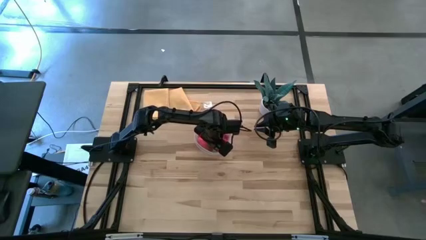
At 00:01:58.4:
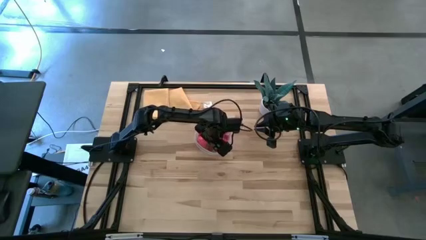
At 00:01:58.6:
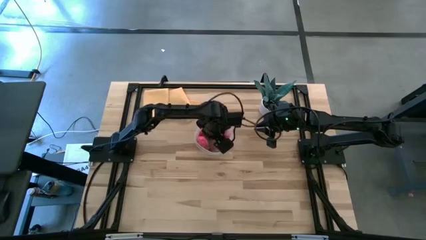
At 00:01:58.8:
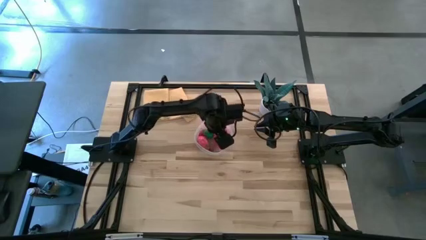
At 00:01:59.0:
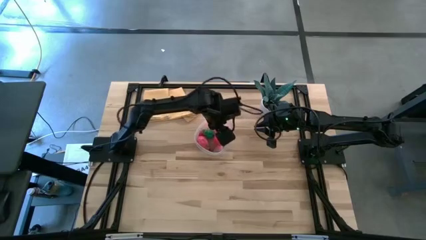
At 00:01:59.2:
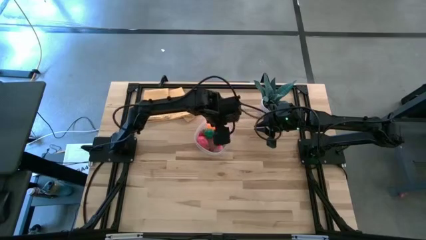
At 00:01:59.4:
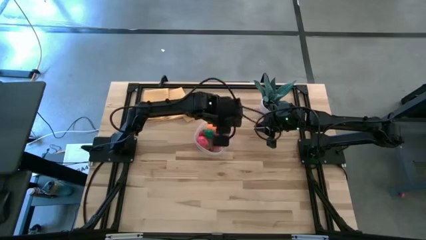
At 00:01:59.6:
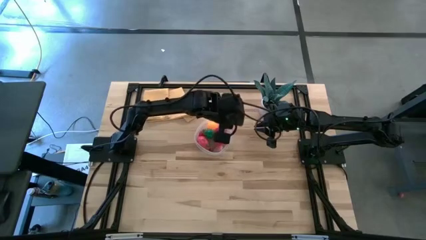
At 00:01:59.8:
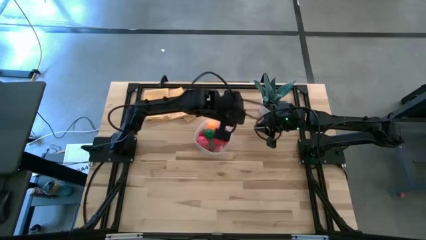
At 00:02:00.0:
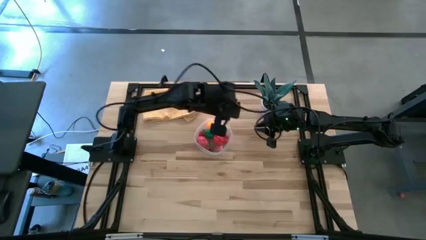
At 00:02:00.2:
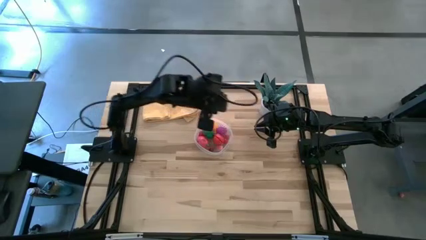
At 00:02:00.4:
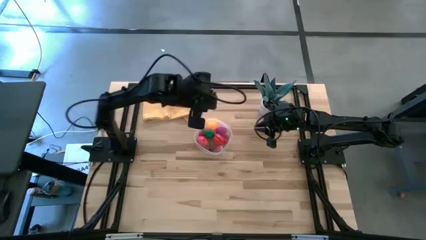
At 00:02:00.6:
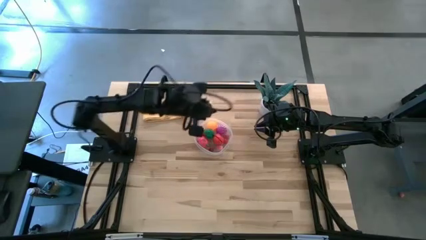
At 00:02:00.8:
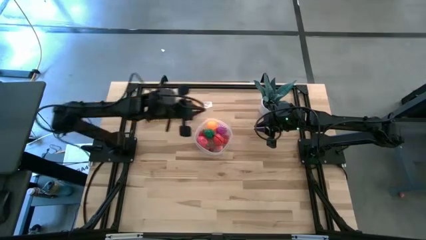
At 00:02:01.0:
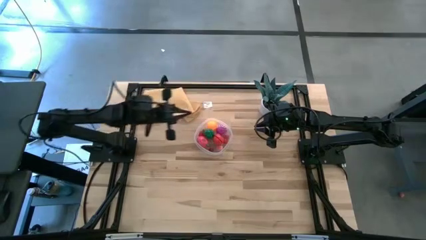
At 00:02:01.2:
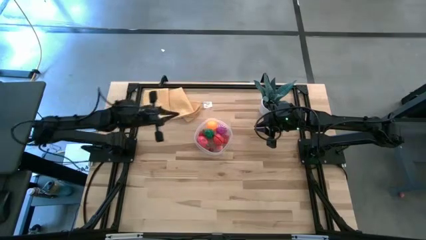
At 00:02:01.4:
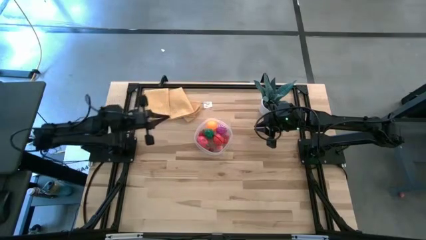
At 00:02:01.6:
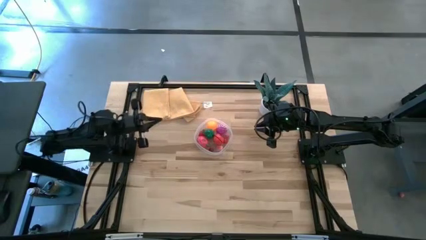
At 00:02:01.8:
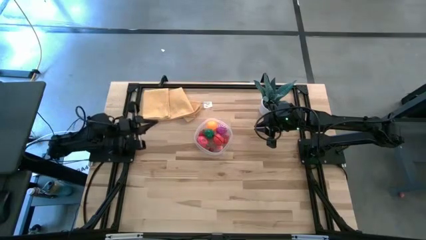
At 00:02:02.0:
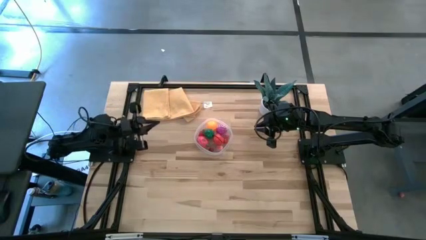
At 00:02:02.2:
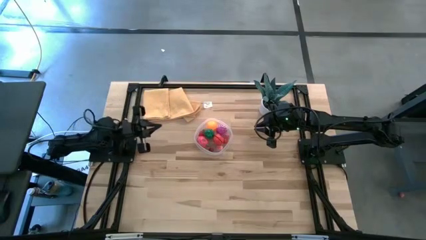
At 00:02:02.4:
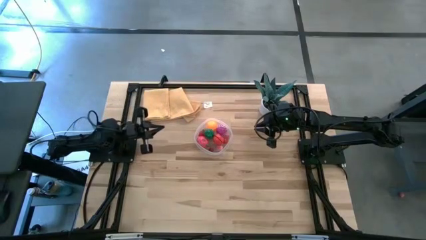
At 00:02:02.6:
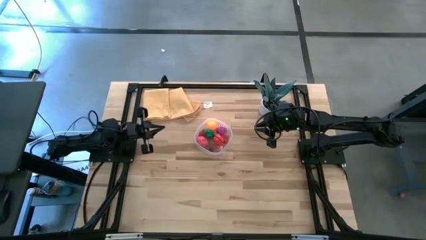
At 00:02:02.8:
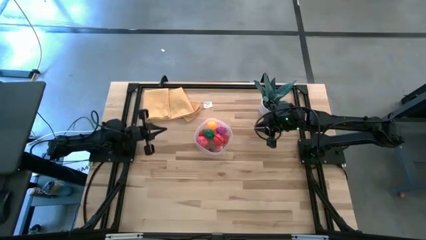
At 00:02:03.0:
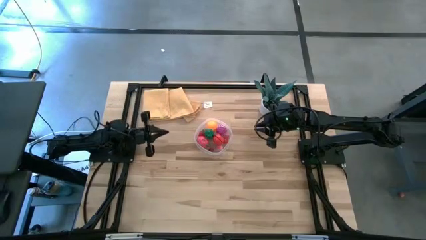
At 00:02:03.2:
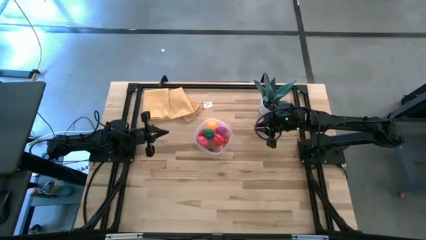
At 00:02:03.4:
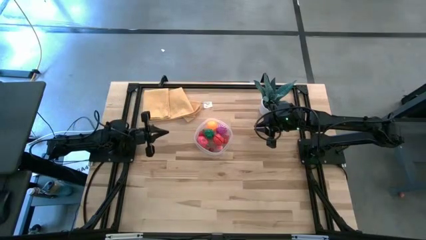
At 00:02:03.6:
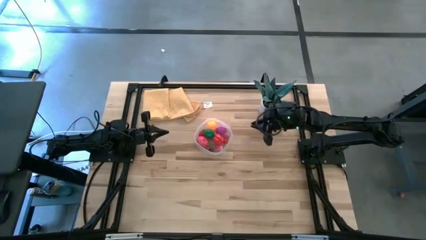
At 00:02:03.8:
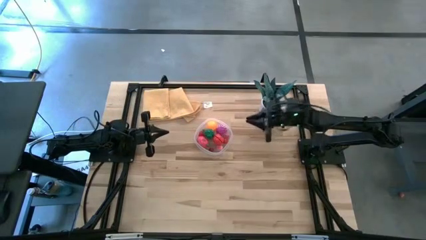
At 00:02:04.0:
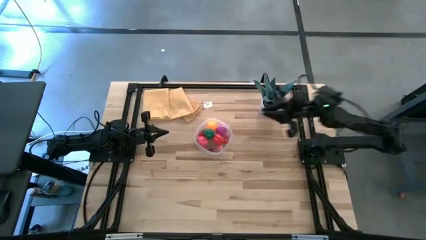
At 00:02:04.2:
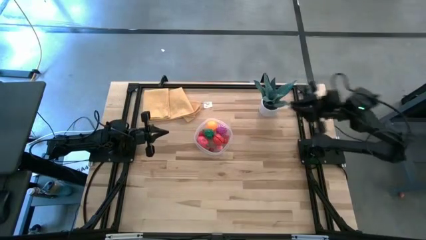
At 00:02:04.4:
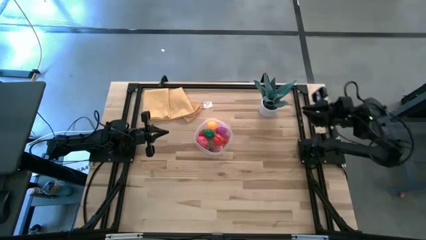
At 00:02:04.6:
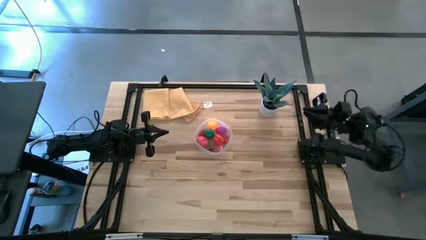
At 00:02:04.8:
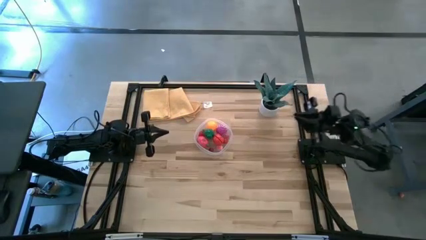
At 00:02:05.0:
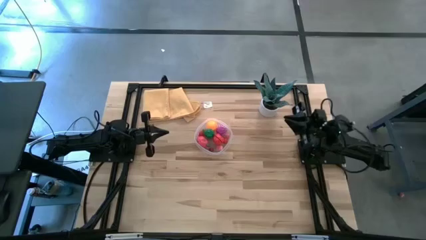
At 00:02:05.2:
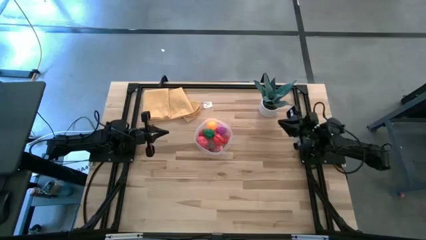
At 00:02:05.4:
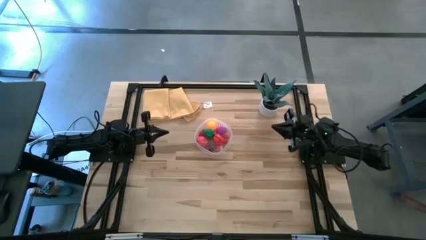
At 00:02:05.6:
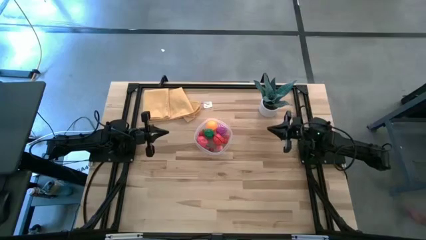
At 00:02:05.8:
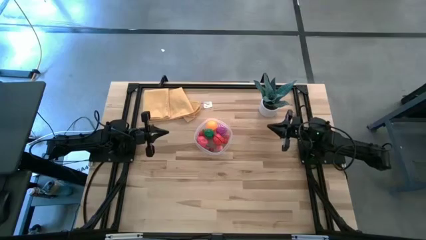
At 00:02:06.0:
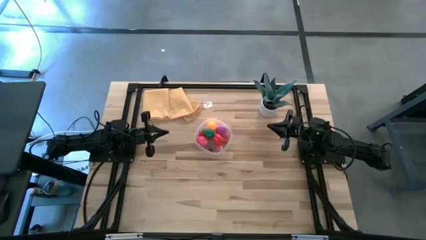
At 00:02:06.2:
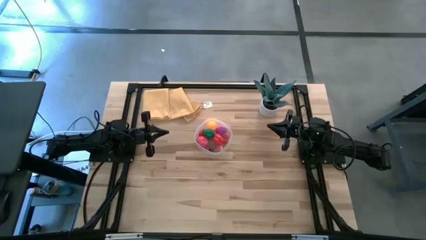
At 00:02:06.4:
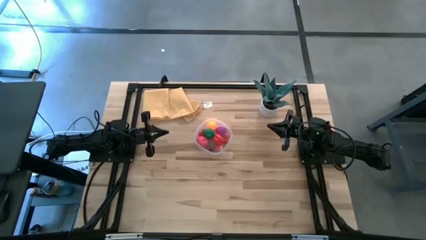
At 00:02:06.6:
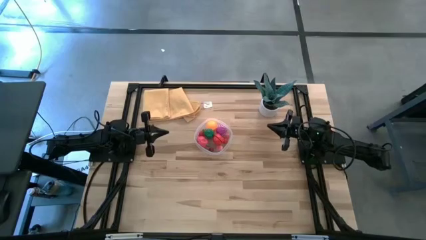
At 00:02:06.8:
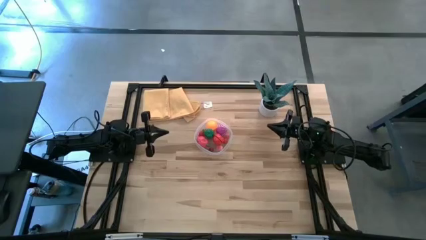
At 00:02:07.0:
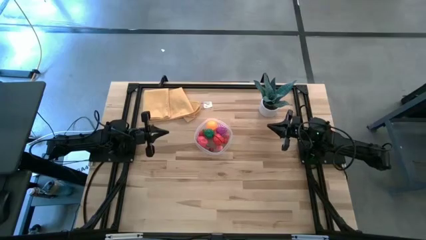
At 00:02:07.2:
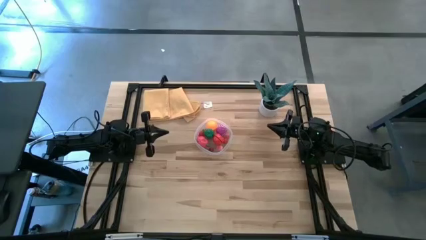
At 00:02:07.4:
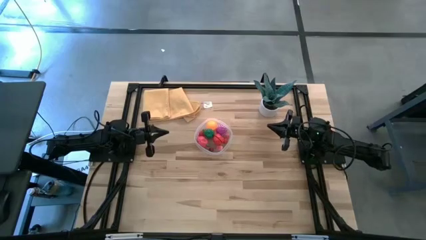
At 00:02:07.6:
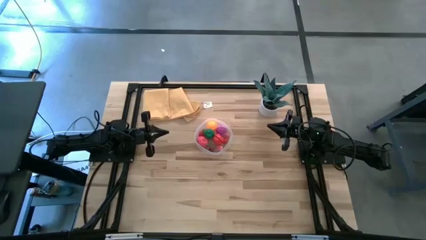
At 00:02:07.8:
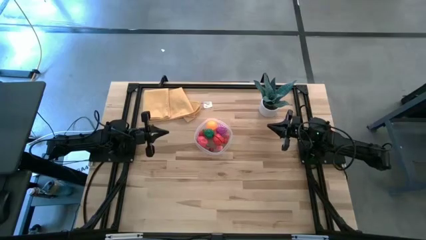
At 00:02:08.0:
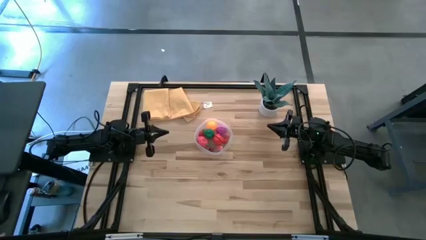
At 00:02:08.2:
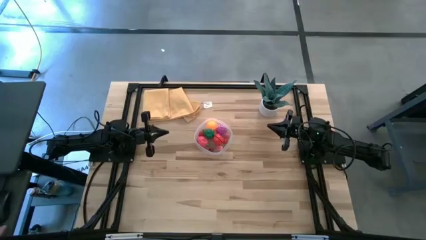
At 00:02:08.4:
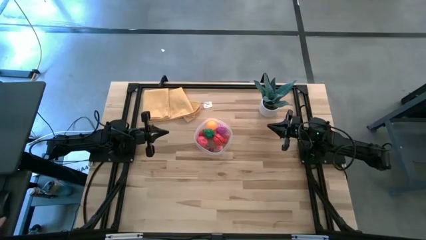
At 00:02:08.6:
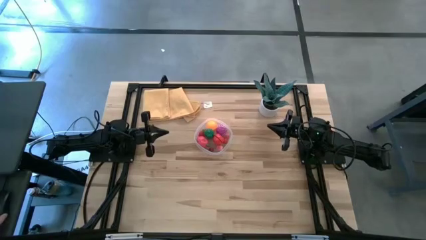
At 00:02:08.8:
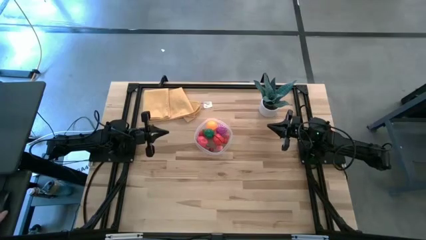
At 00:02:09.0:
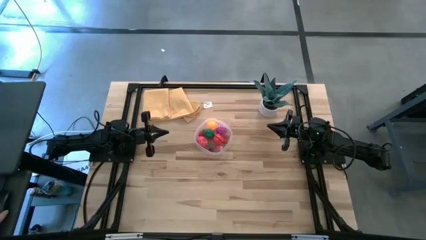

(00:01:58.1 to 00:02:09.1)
Task: Pick and placing Produce into tupperware
Return to Home Position

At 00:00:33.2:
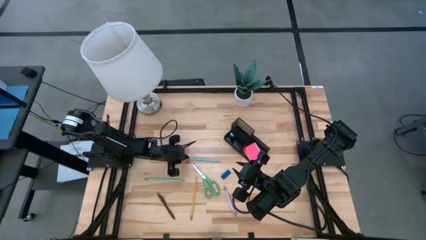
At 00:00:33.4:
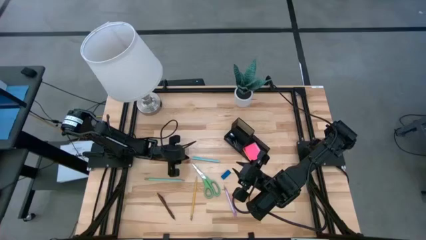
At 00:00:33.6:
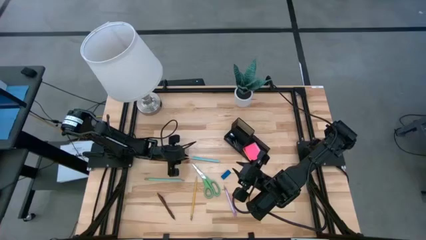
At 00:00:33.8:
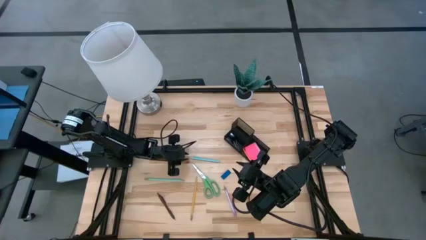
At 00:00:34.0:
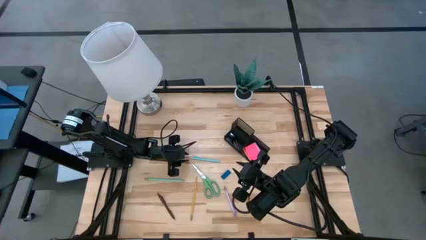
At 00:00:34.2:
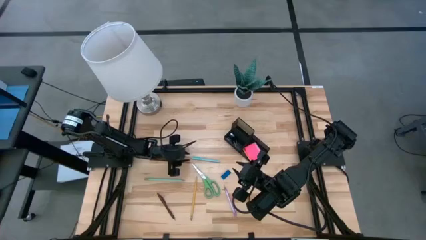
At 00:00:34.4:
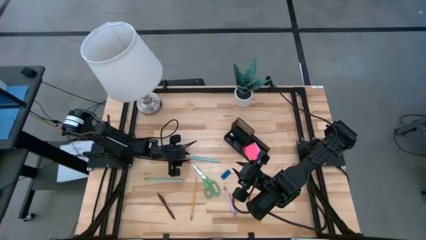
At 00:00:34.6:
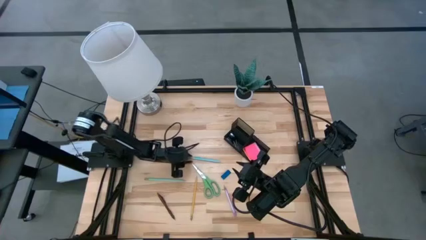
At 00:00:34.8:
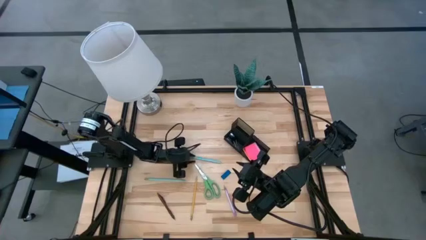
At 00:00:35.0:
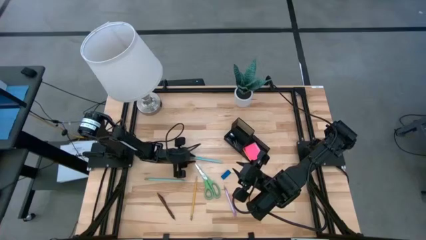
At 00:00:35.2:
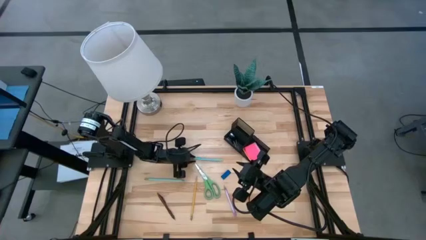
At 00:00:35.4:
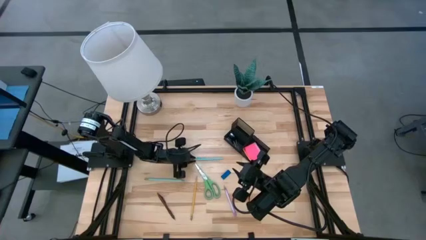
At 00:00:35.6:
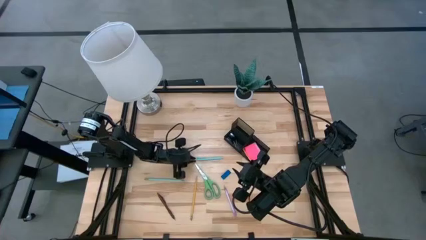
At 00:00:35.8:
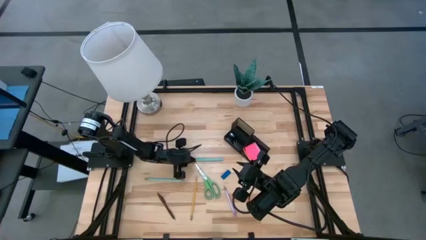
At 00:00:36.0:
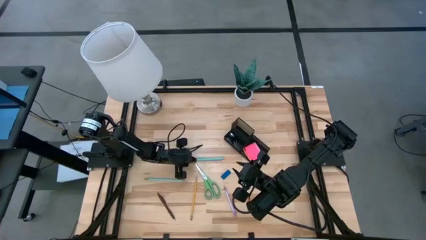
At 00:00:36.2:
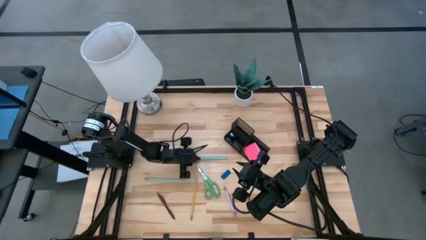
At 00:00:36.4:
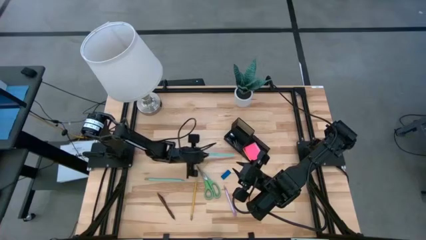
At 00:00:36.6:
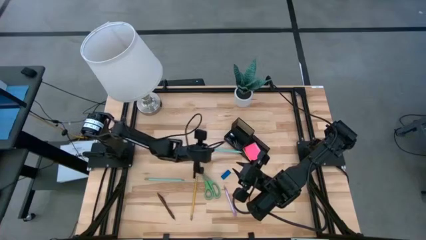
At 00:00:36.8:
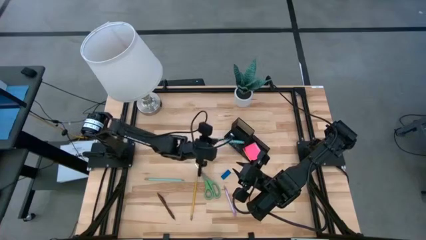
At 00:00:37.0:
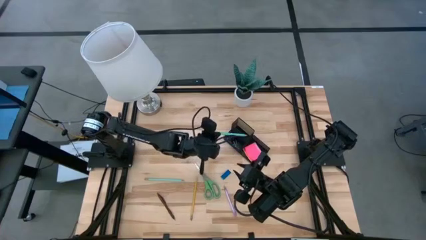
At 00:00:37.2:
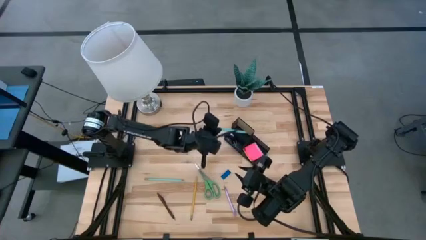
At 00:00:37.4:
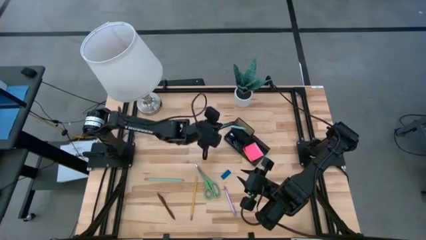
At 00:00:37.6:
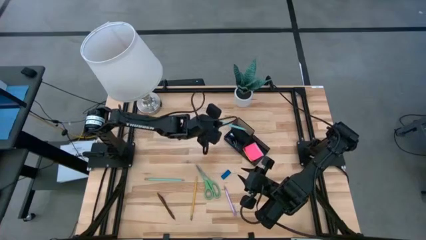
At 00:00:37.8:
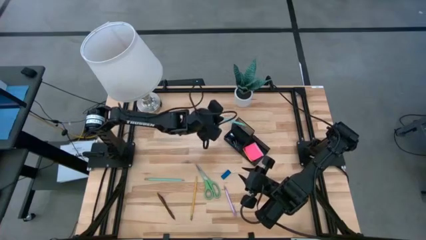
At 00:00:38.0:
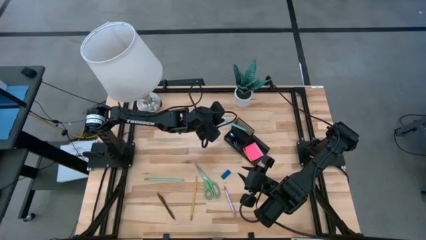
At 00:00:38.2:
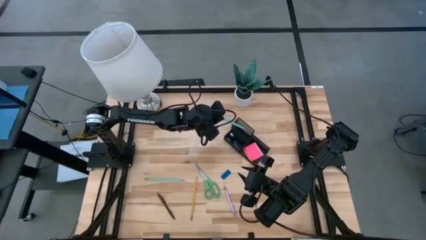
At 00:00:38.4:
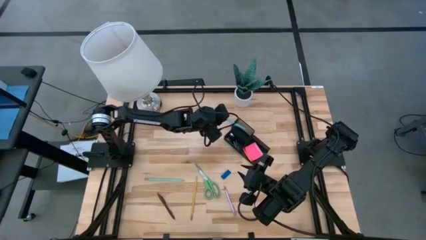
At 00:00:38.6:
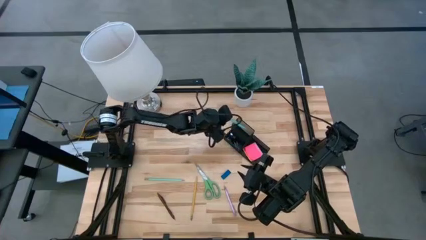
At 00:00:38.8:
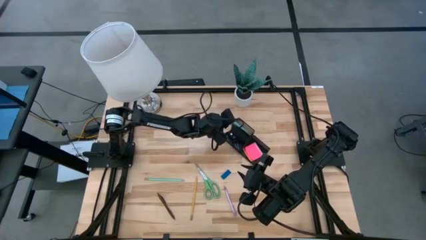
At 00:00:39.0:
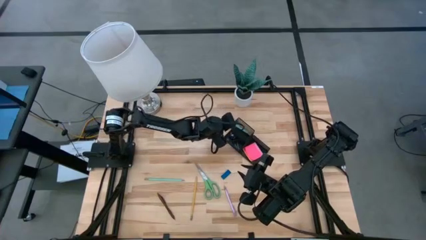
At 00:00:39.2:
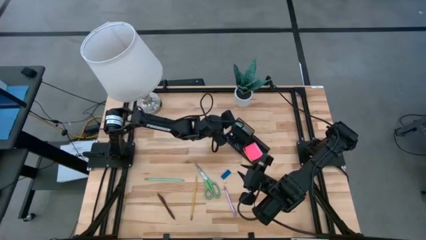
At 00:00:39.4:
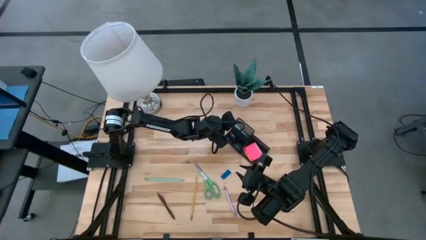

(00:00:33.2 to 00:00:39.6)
Task: Pick and place office supplies into organizer
Put the blue pen into the desk organizer
